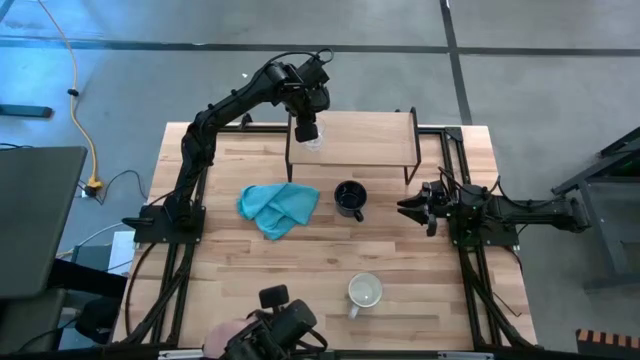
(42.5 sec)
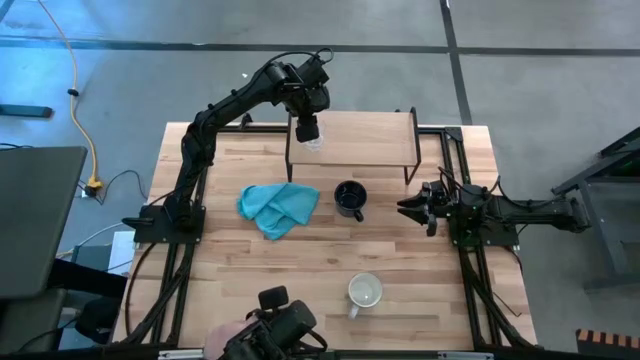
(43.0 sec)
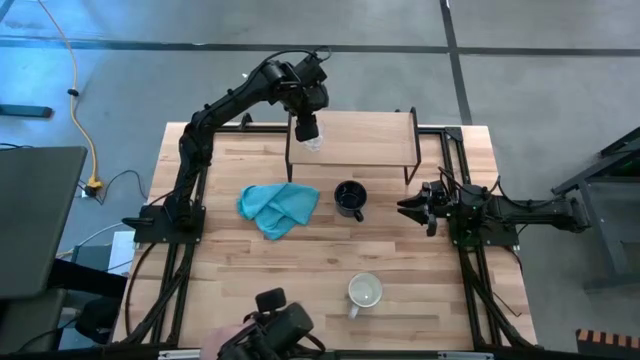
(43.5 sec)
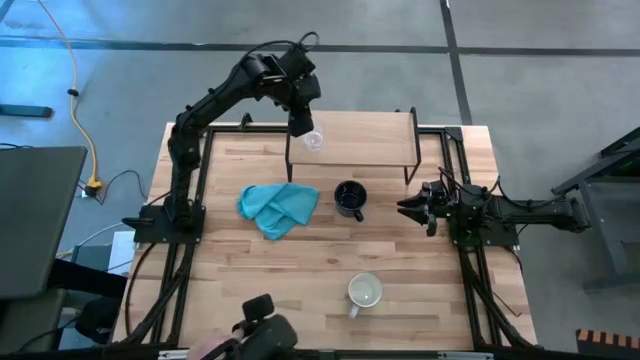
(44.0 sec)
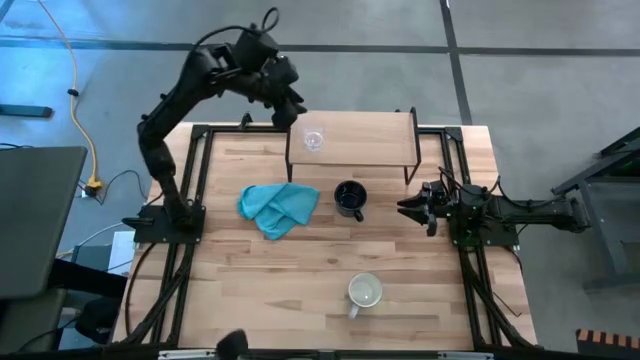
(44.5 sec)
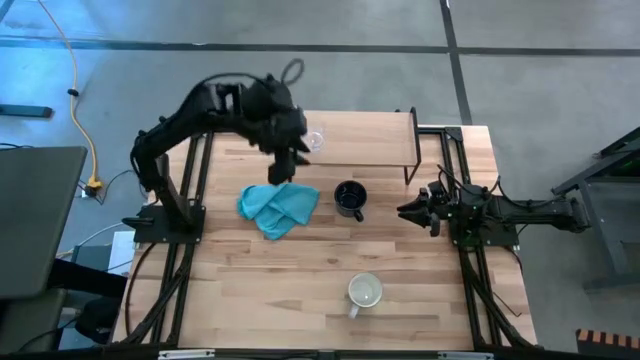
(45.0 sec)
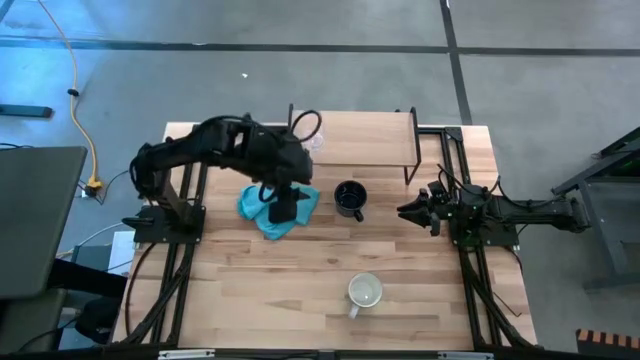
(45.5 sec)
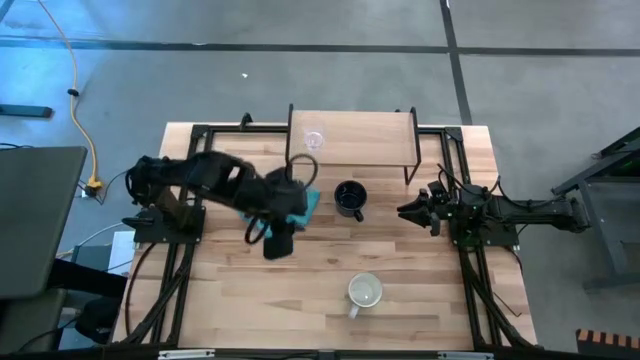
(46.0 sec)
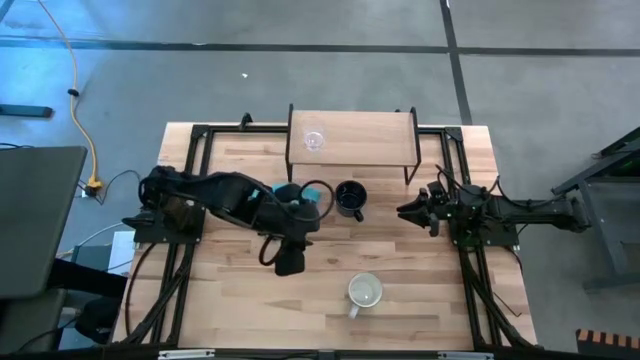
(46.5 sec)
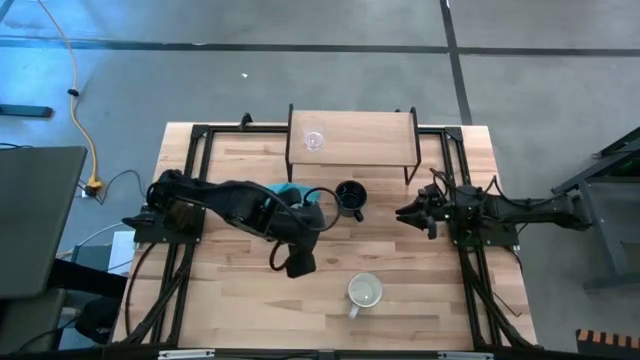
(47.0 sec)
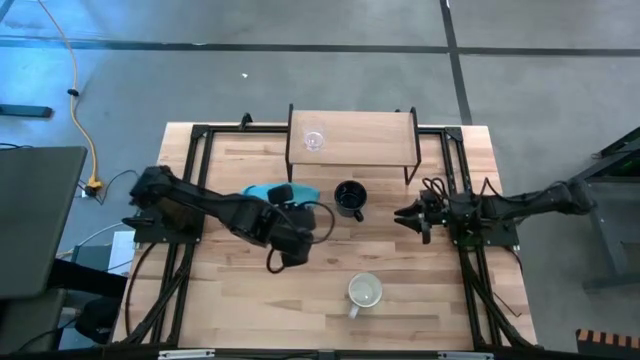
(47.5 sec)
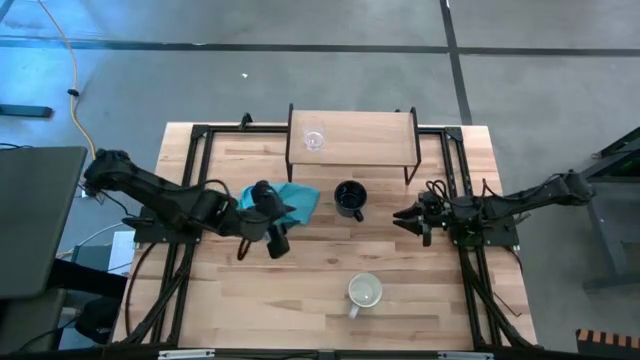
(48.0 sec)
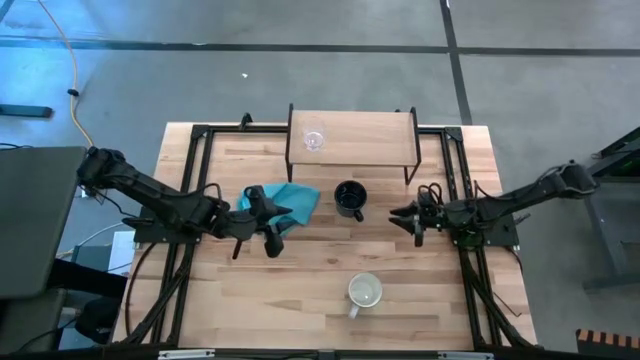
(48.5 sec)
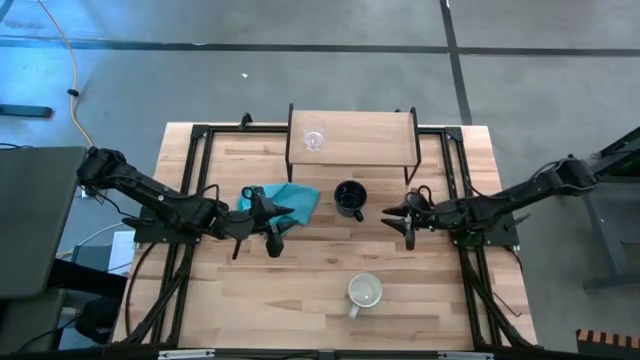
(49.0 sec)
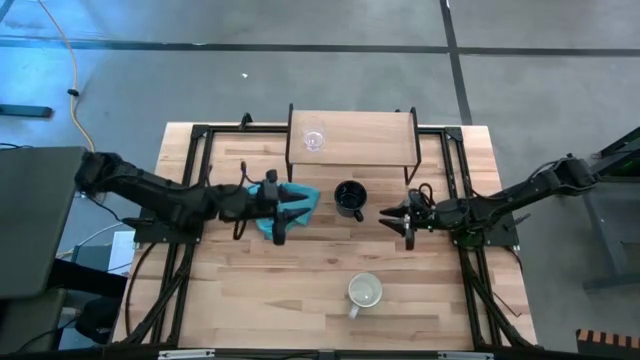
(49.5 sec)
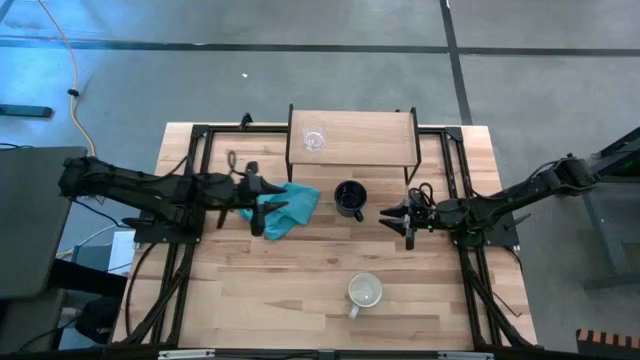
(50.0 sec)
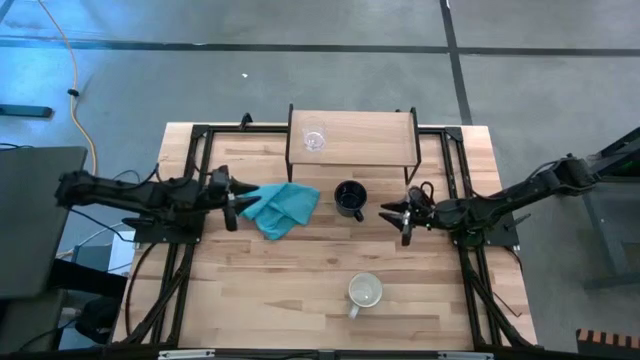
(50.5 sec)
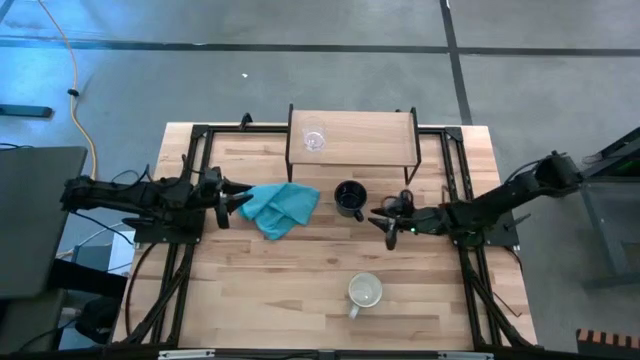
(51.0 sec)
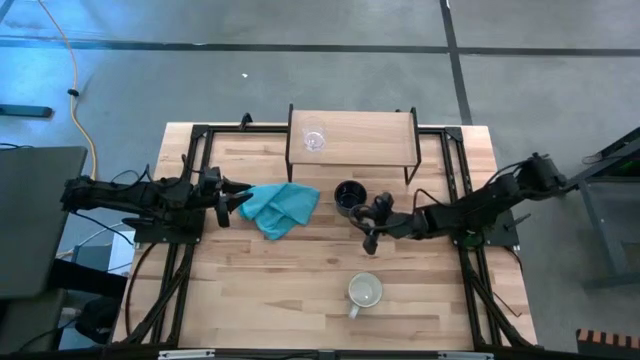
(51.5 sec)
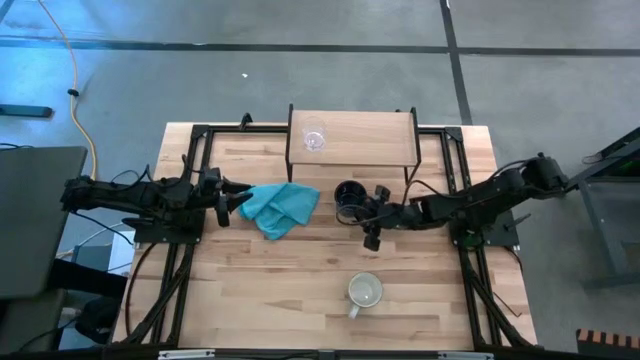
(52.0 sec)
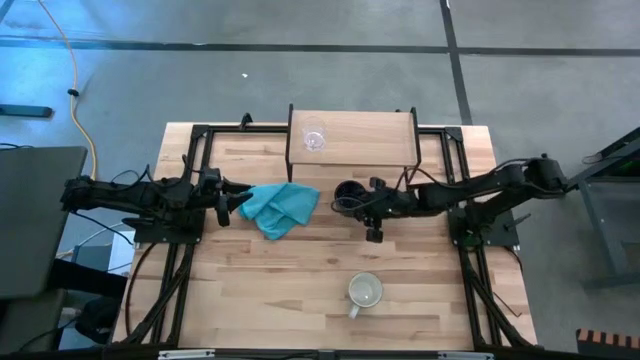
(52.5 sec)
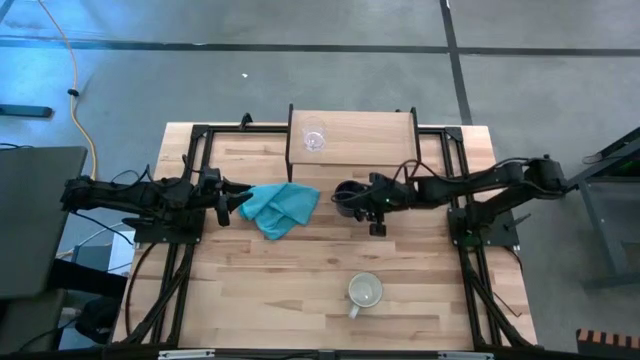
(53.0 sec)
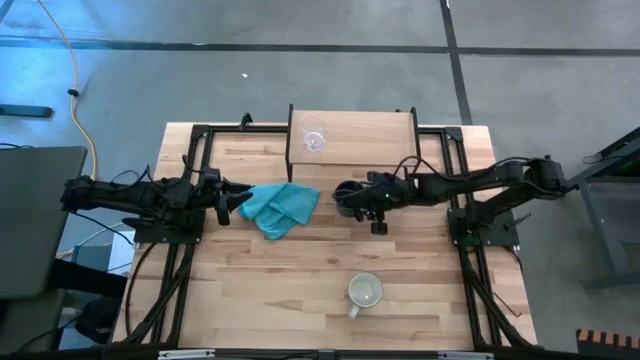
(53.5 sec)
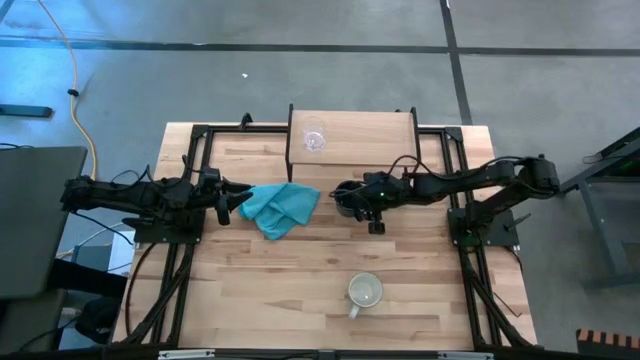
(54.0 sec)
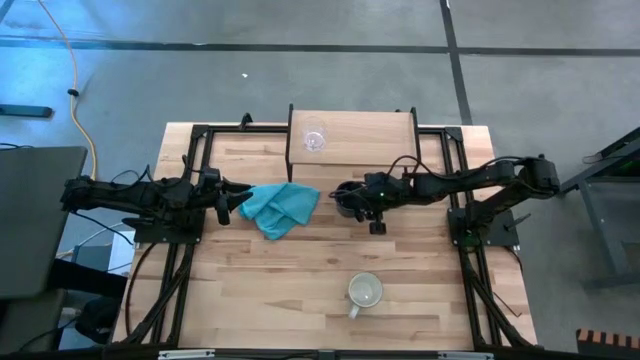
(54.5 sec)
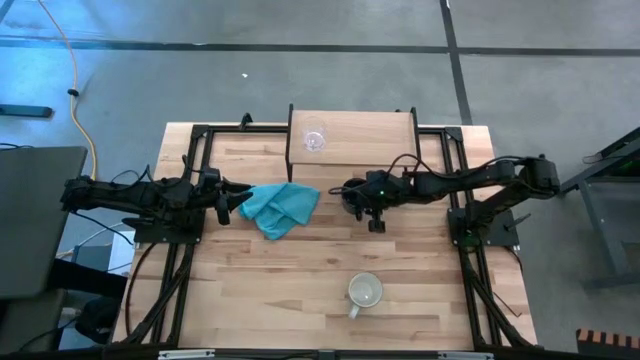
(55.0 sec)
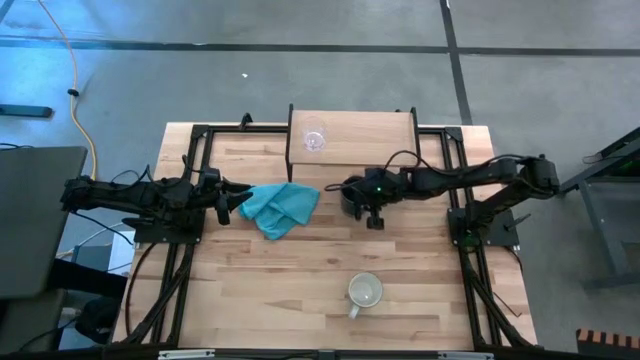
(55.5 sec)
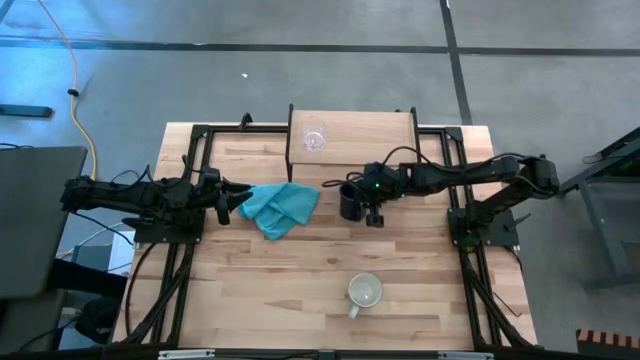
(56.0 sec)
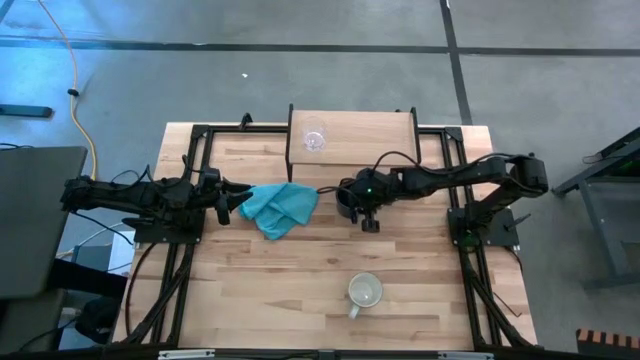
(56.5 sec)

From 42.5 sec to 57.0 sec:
Task: Stack small to large cups/mugs on shelf
Put the dark blue mug on the shelf

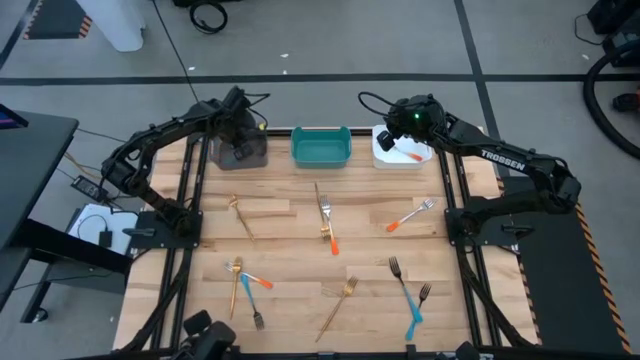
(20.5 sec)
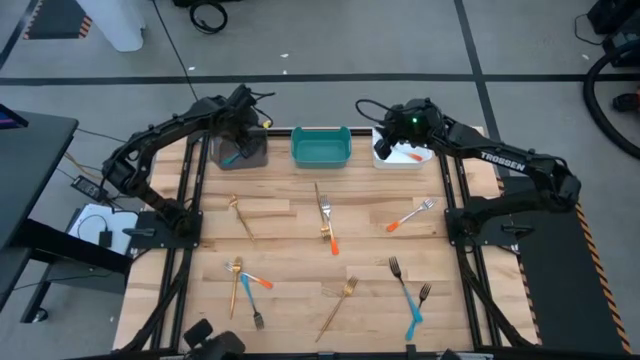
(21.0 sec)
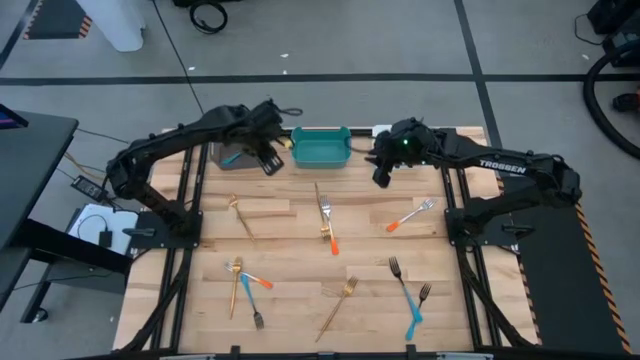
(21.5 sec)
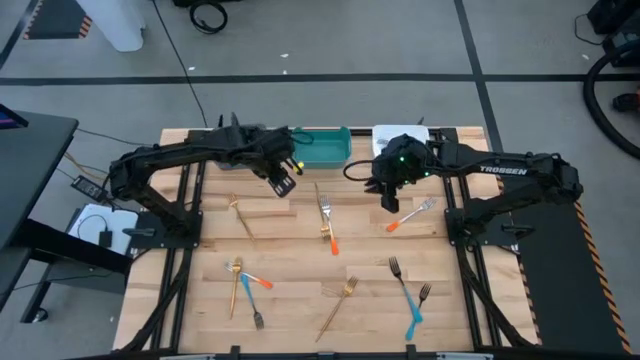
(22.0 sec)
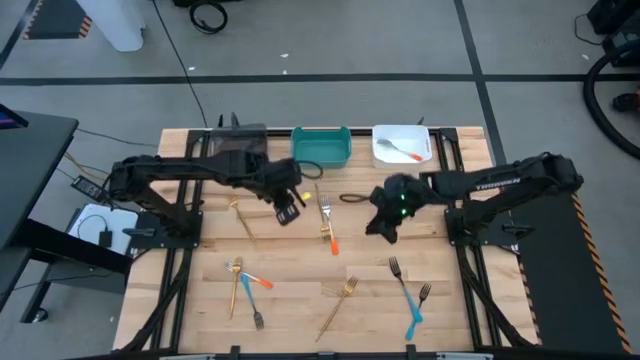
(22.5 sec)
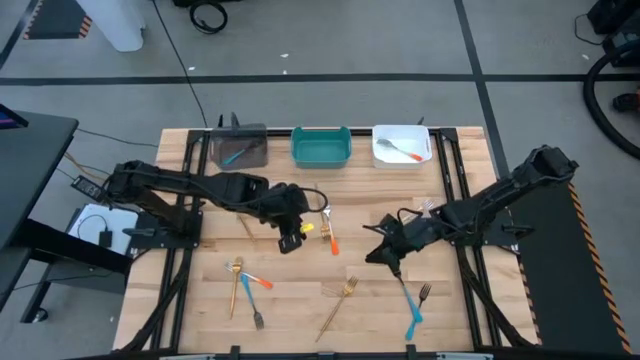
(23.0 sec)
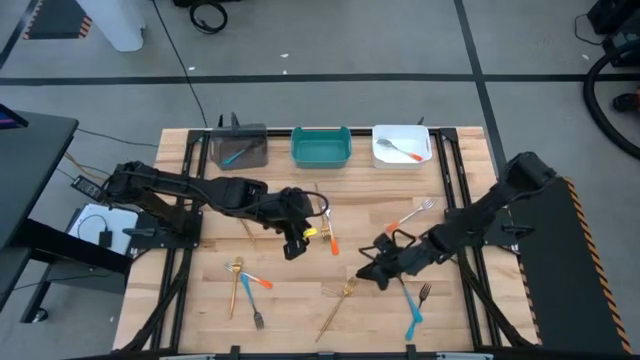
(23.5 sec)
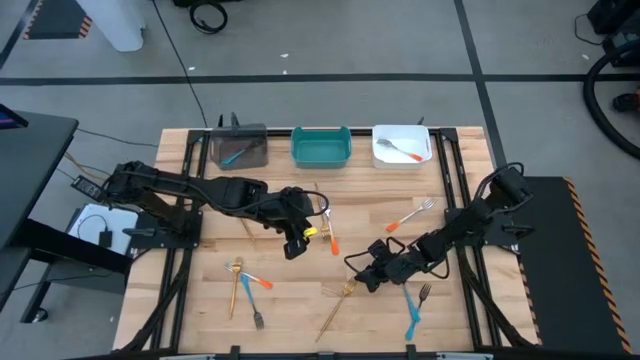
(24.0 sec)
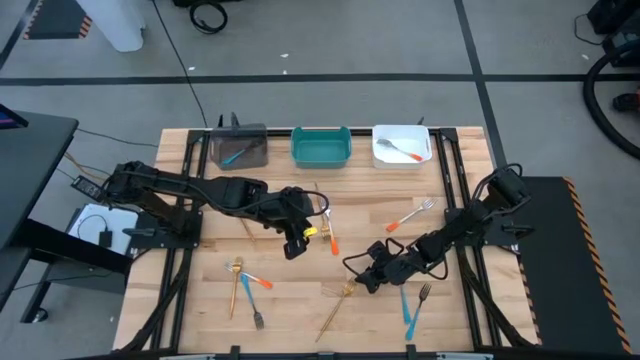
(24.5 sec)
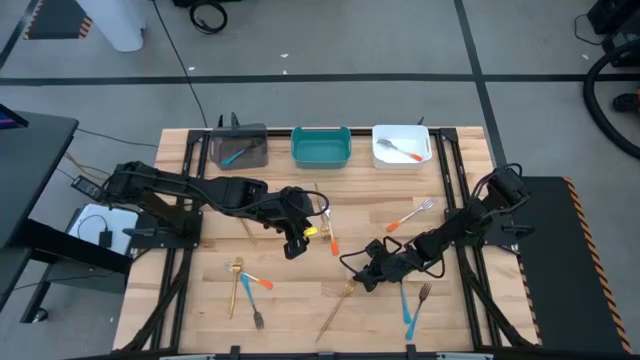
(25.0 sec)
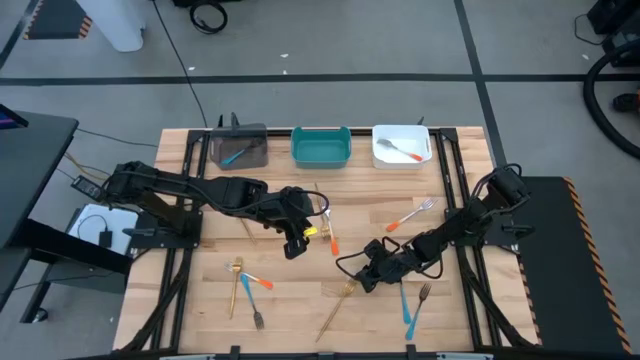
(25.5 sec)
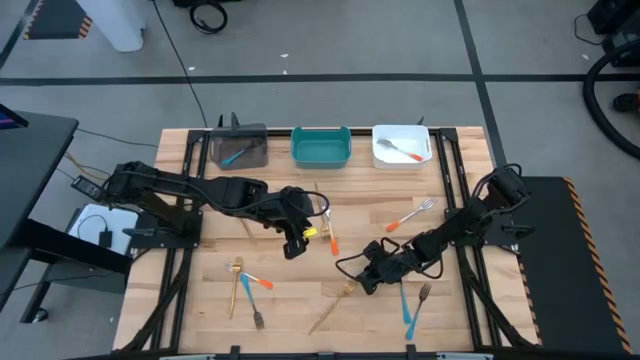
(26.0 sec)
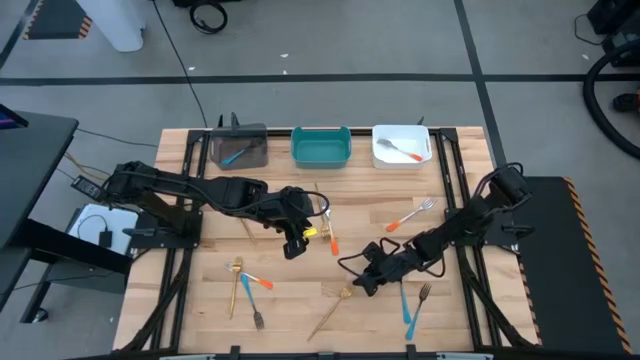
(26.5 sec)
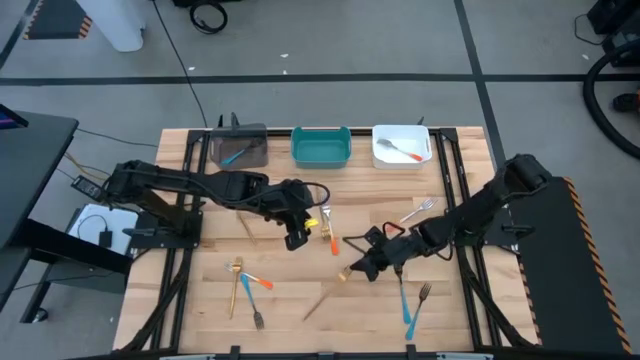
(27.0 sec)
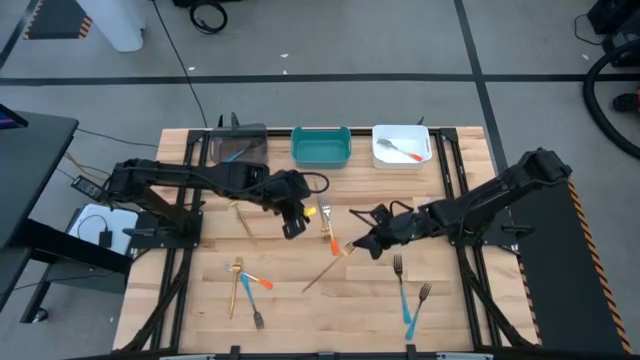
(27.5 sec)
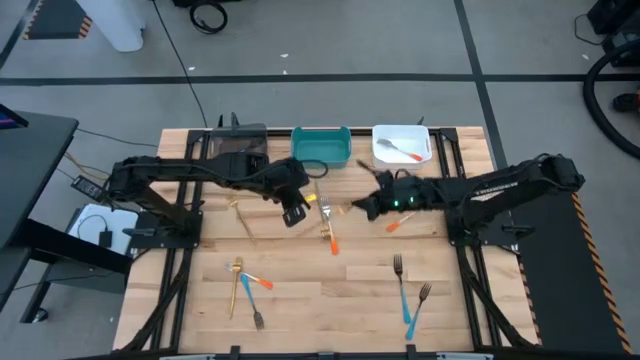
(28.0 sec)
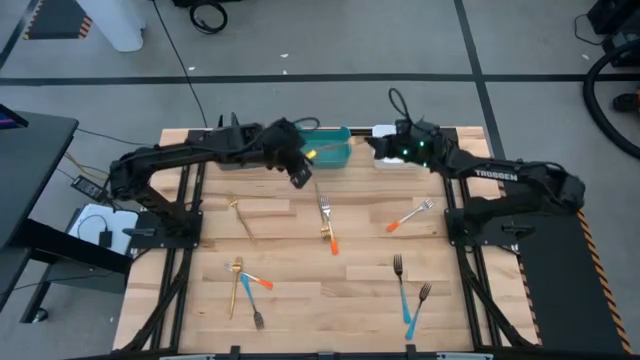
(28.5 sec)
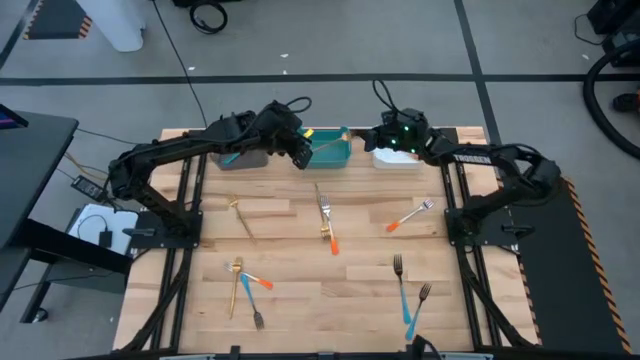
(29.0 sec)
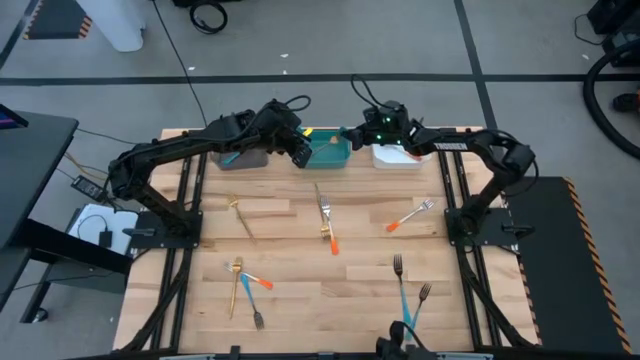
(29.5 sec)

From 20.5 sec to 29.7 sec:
Task: Sort silverware by color (type)
Put the gold fork into the green bin
